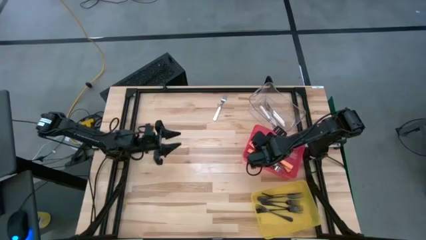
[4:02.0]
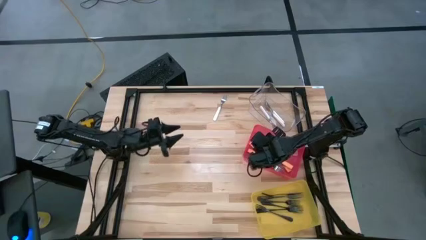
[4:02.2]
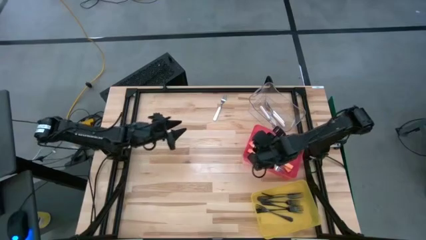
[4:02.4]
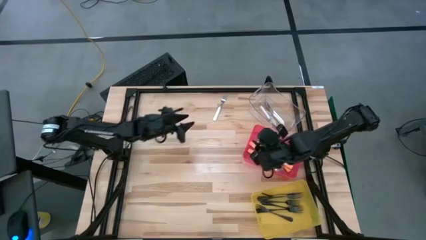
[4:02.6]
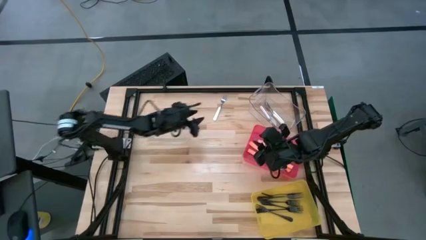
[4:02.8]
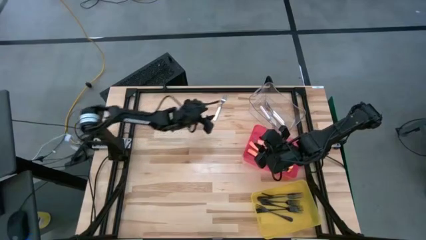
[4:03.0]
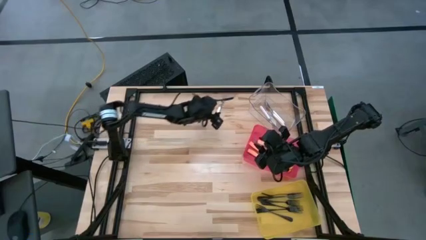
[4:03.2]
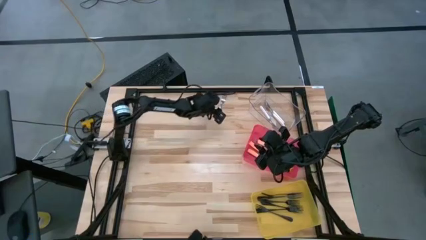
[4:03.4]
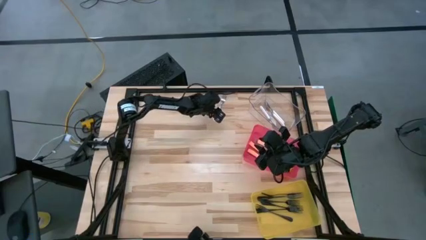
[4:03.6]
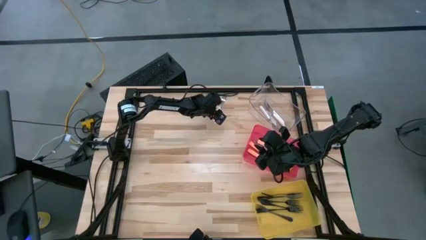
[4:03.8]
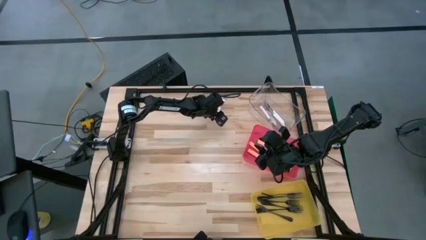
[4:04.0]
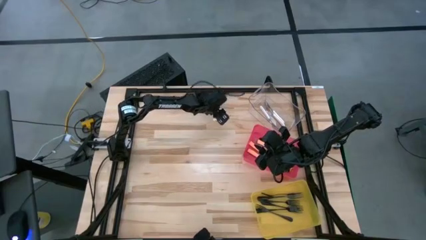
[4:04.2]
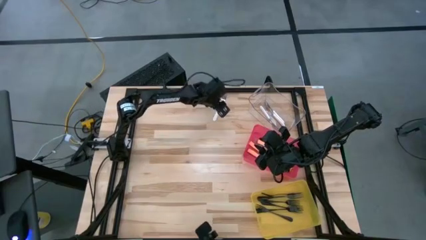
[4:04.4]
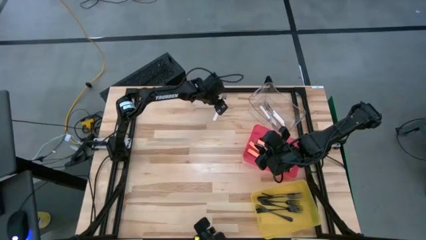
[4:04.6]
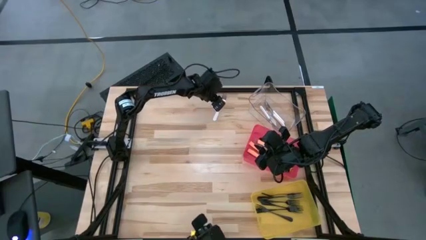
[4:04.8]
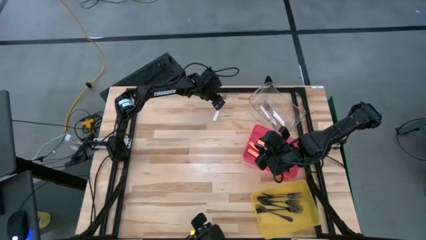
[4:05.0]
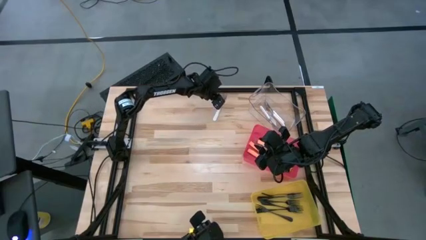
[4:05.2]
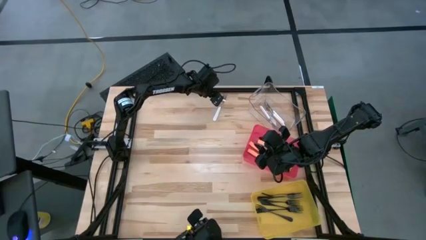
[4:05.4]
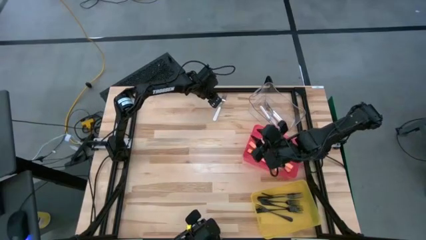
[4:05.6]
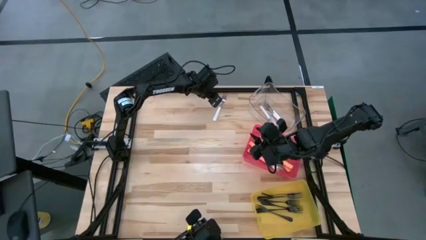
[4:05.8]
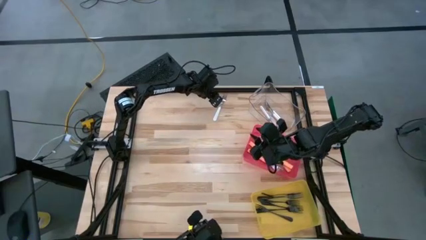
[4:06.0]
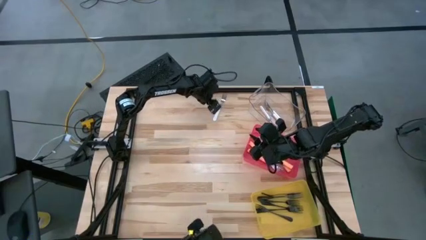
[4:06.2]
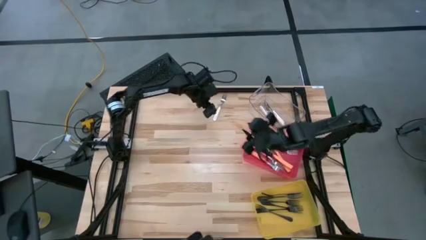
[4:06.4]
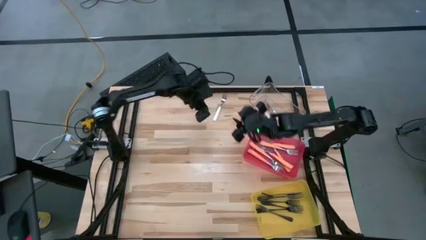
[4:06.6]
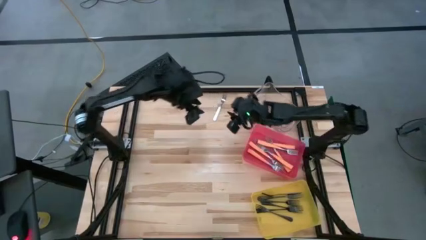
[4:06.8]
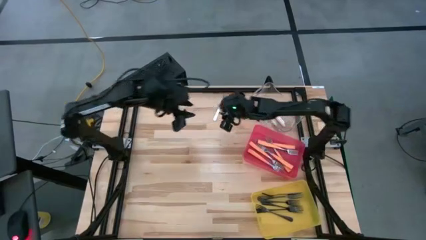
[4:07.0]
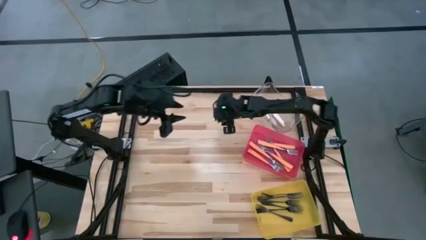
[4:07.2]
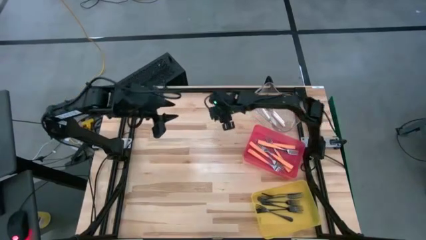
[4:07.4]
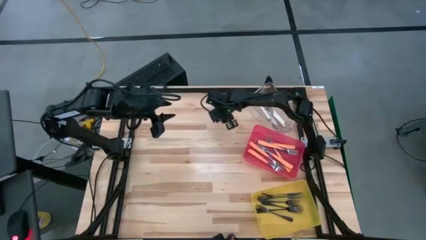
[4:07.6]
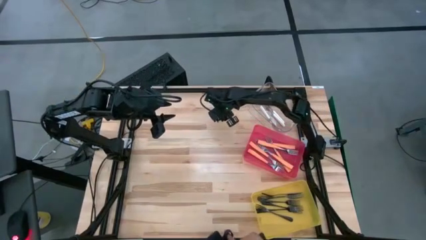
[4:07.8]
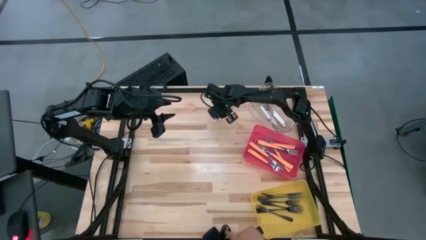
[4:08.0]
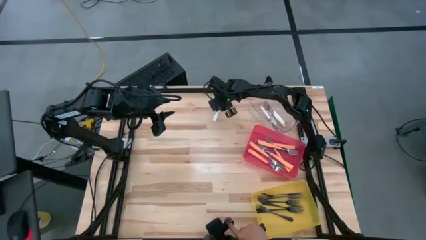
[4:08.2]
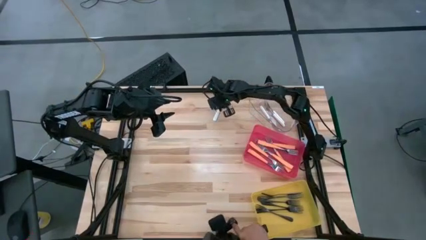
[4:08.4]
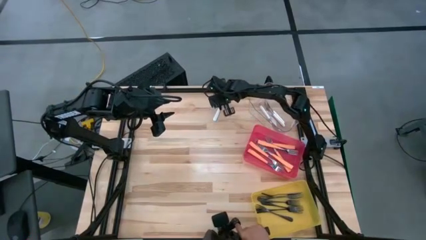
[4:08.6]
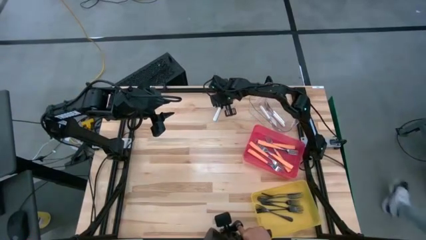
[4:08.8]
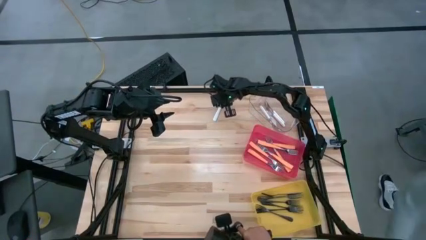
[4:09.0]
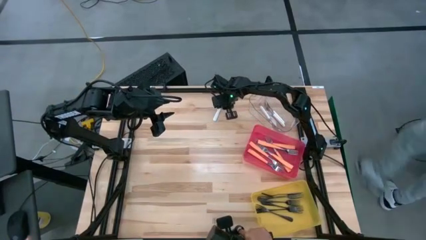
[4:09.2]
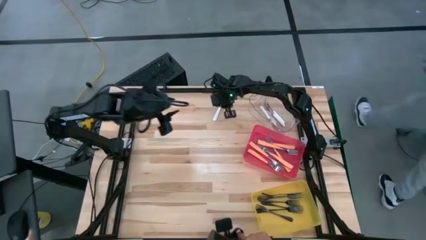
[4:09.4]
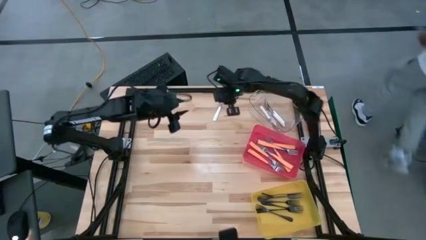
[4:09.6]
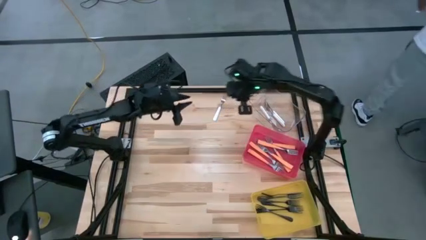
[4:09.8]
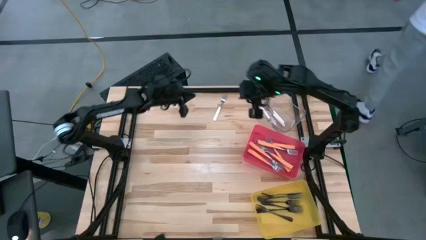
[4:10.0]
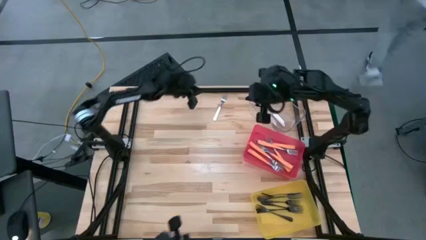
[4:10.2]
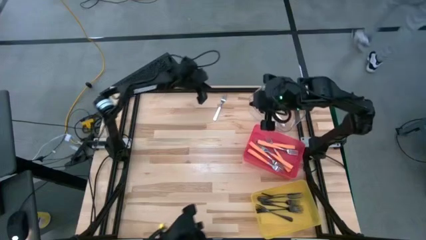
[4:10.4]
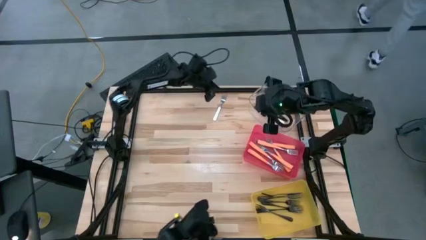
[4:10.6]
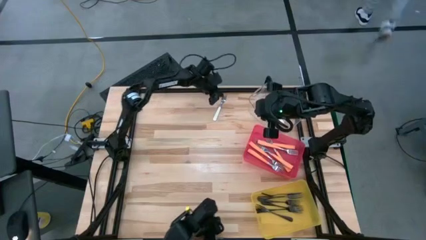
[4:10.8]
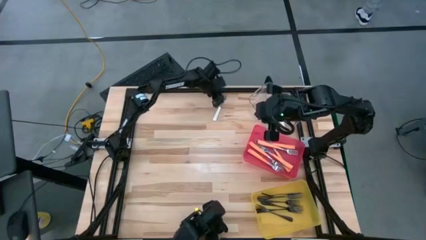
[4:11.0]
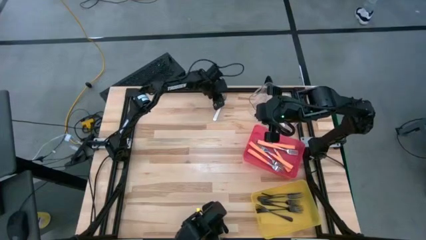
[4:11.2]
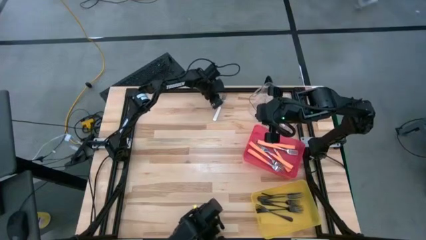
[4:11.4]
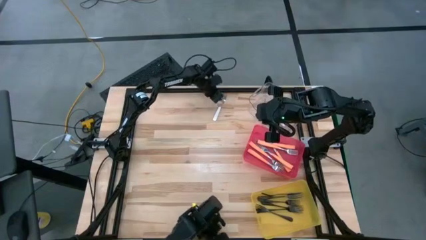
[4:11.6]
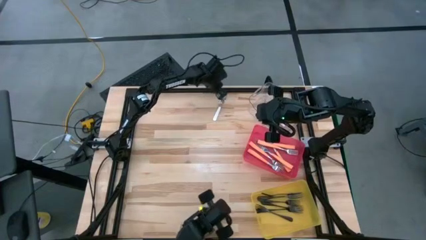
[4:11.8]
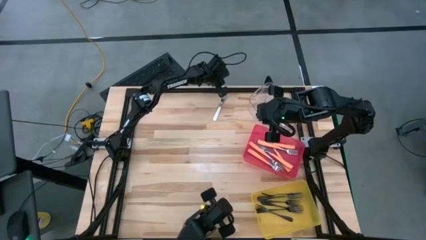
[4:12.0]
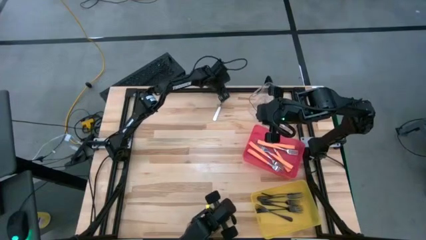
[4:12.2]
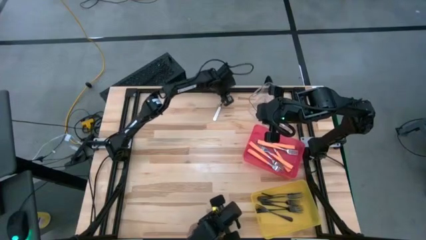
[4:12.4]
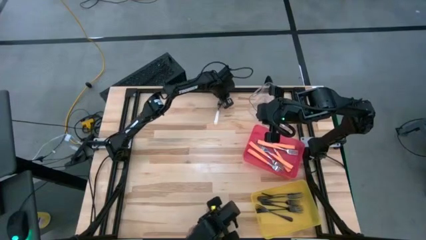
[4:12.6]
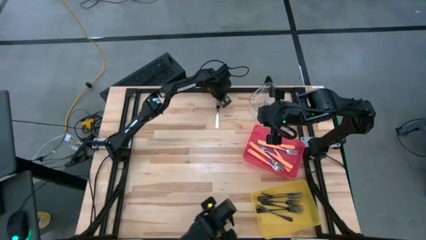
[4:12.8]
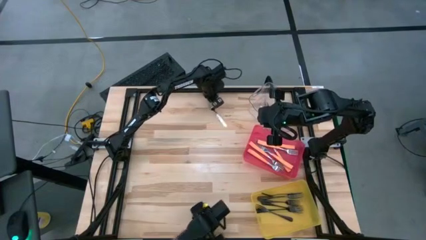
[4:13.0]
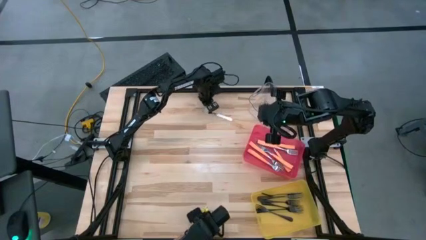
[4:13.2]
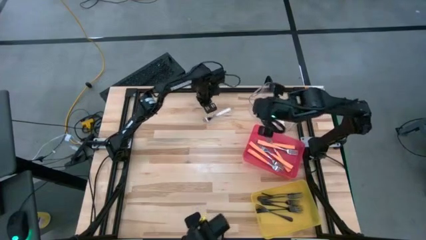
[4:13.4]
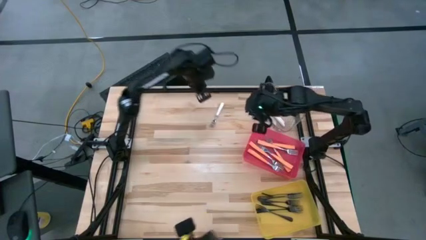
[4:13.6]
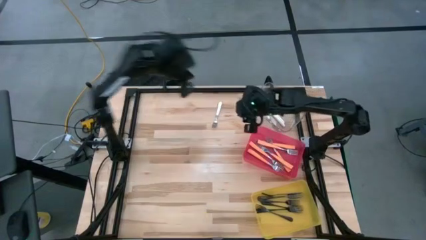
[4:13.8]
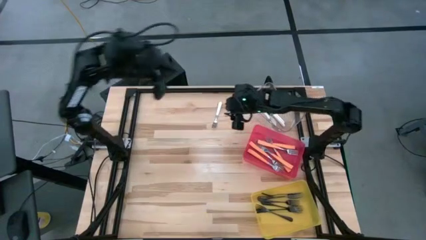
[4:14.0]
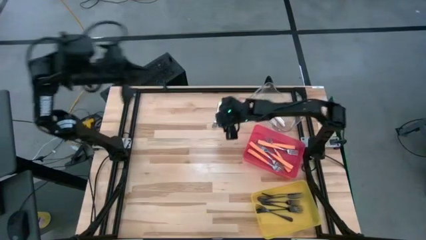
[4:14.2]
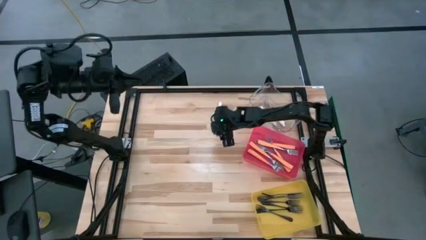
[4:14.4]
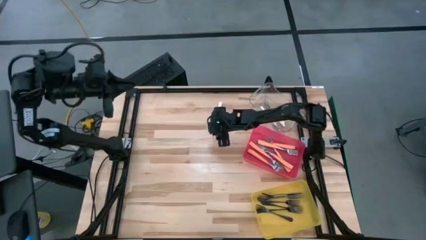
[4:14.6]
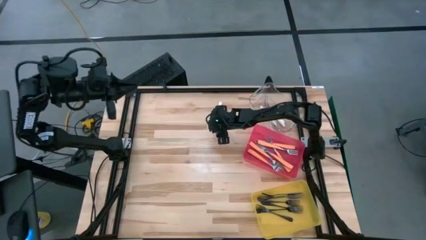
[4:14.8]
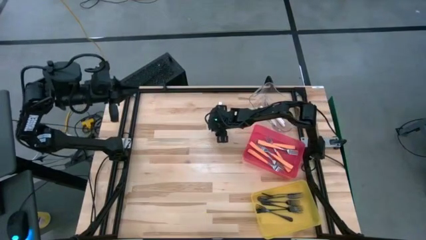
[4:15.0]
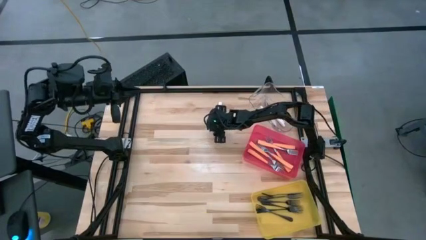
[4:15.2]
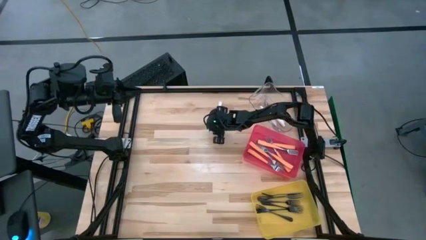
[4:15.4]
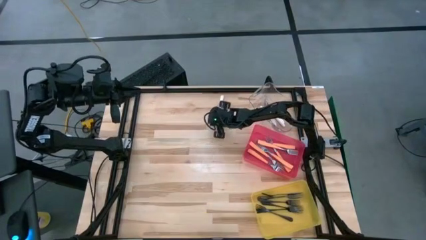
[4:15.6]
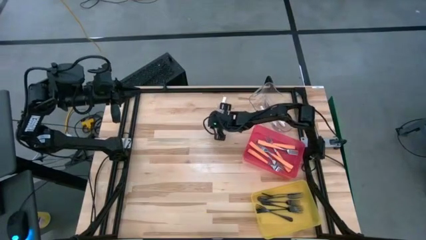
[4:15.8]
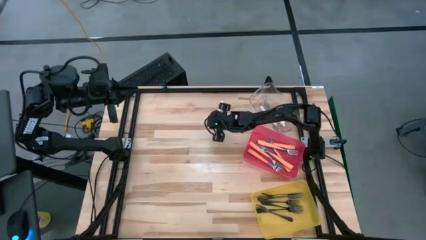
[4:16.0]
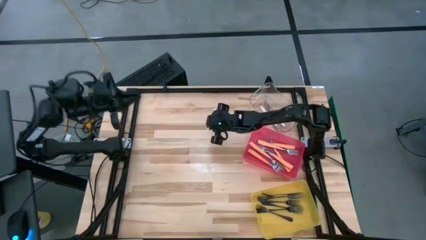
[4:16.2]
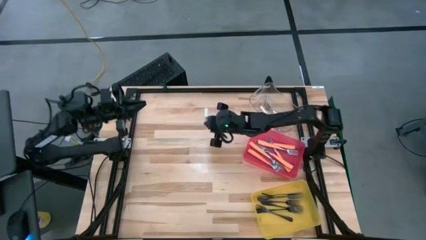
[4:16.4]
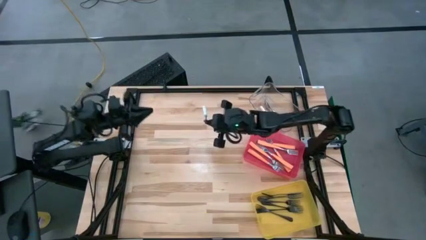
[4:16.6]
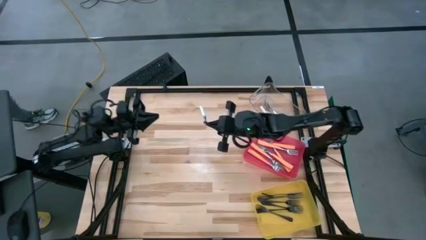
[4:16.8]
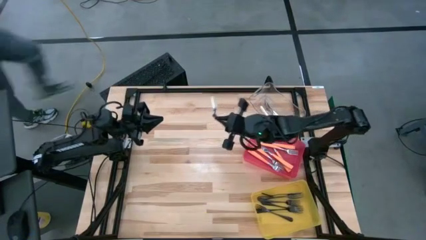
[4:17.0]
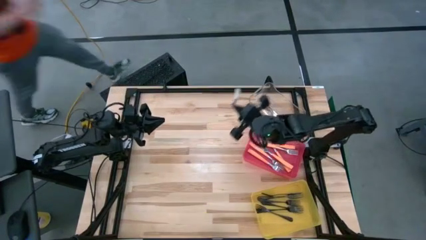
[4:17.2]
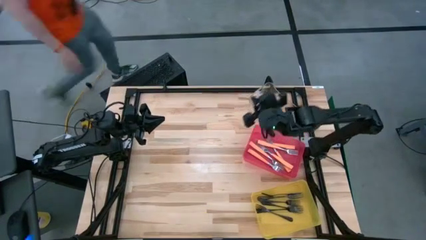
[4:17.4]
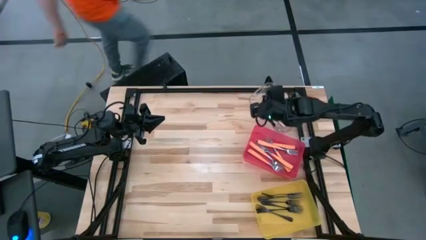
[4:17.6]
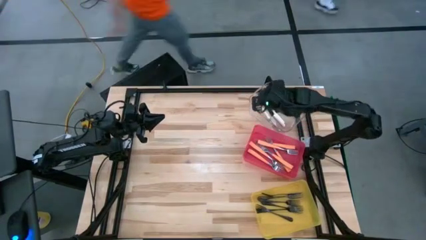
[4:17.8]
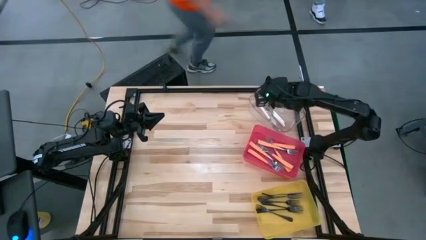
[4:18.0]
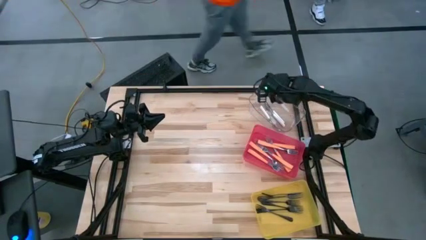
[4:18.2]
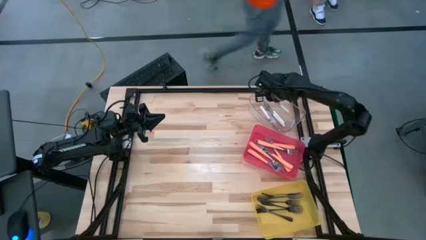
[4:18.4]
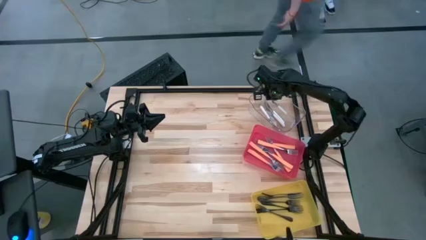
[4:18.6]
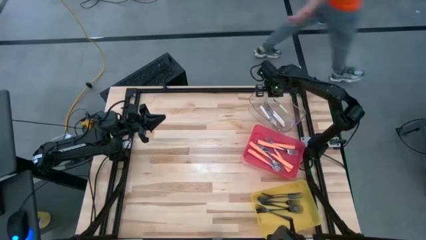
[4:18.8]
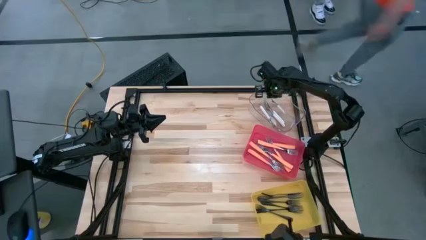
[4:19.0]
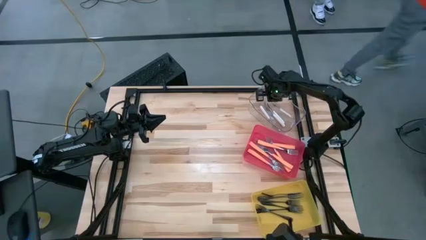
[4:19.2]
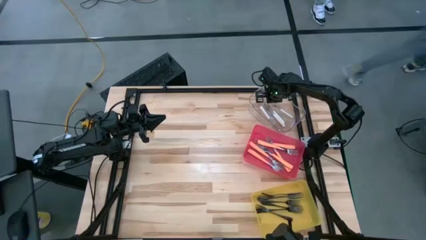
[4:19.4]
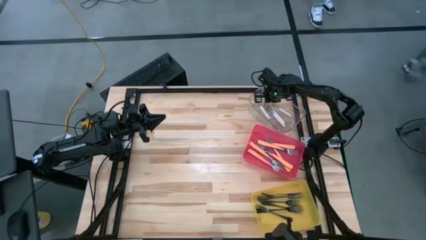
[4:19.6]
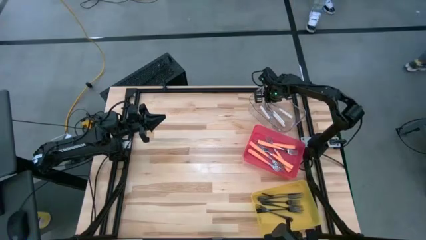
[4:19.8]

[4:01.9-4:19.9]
Task: Sort silverware by color (type)
Put the white fork into the transparent bin
